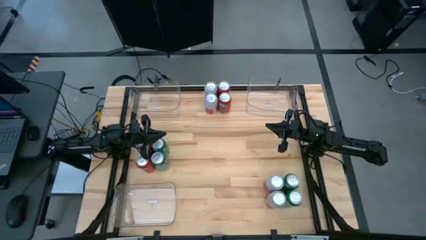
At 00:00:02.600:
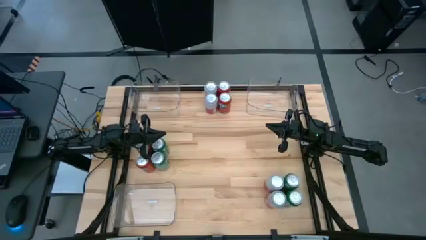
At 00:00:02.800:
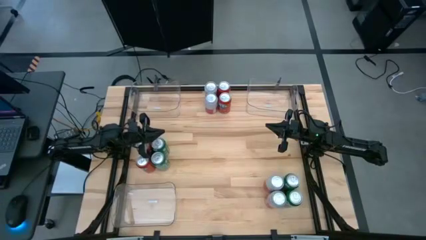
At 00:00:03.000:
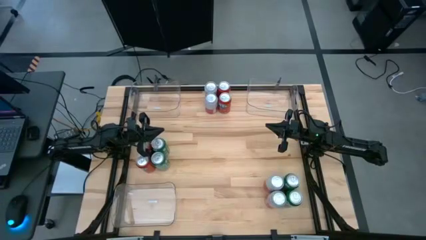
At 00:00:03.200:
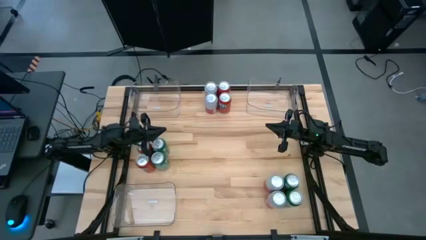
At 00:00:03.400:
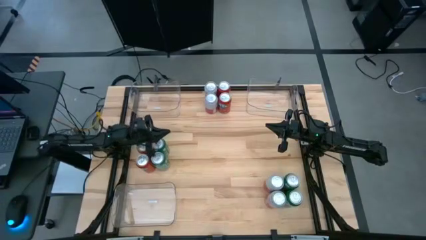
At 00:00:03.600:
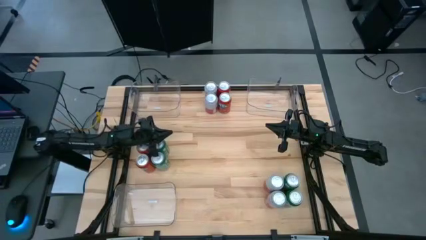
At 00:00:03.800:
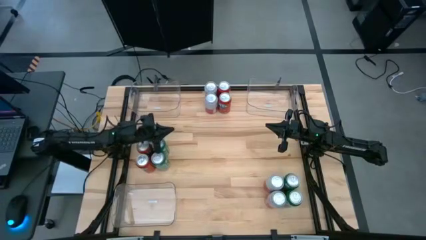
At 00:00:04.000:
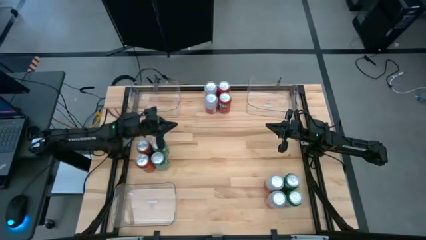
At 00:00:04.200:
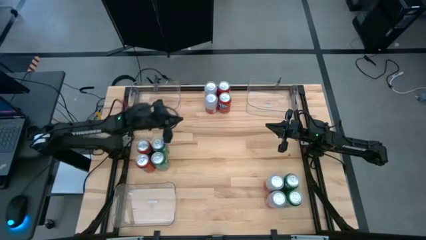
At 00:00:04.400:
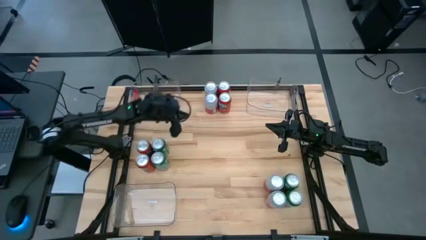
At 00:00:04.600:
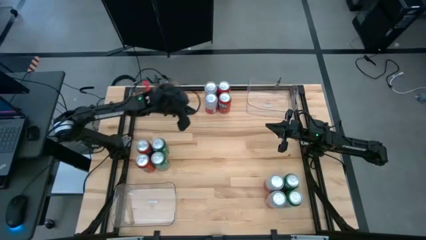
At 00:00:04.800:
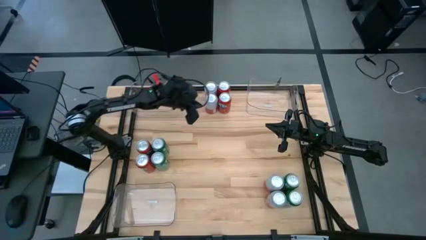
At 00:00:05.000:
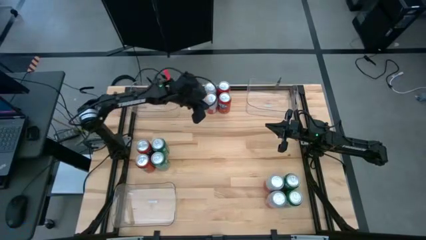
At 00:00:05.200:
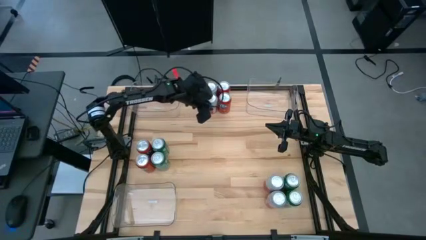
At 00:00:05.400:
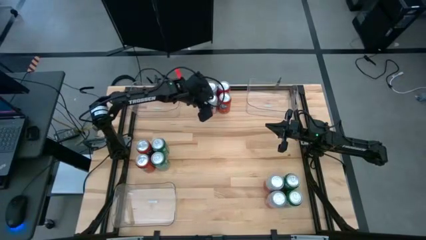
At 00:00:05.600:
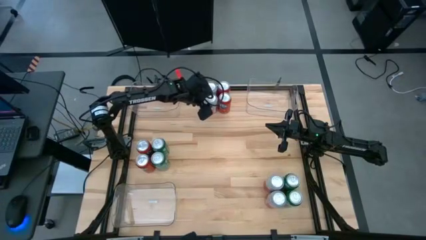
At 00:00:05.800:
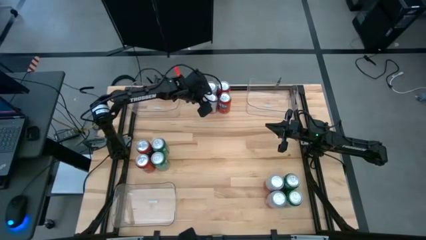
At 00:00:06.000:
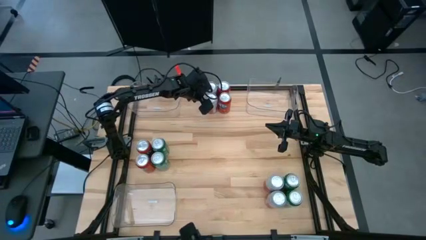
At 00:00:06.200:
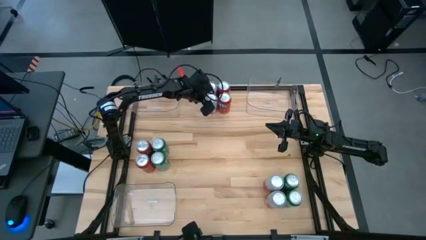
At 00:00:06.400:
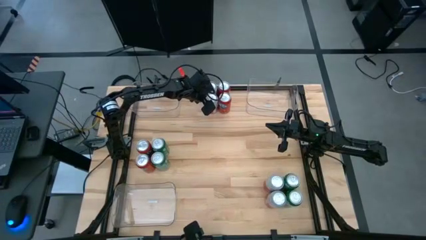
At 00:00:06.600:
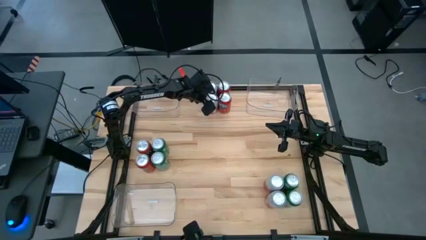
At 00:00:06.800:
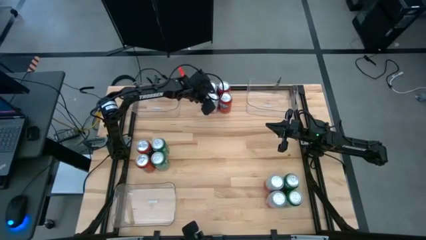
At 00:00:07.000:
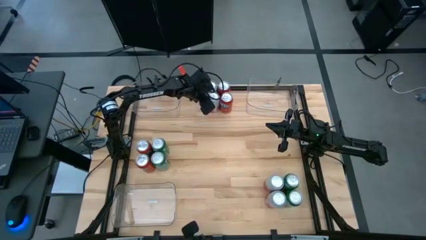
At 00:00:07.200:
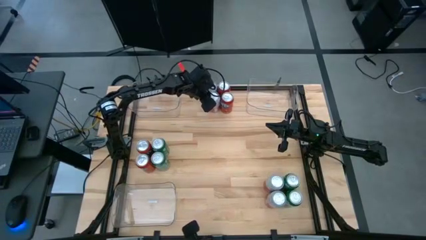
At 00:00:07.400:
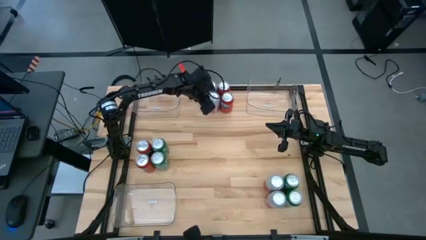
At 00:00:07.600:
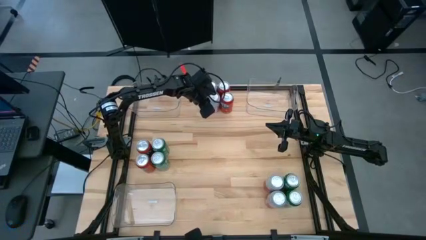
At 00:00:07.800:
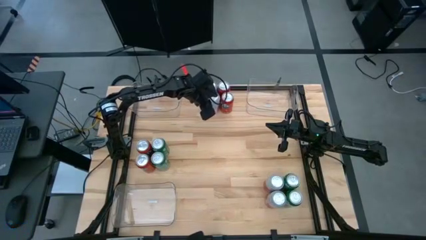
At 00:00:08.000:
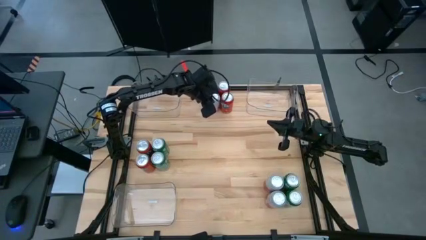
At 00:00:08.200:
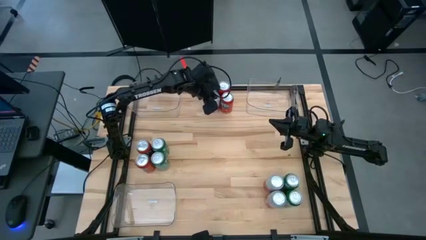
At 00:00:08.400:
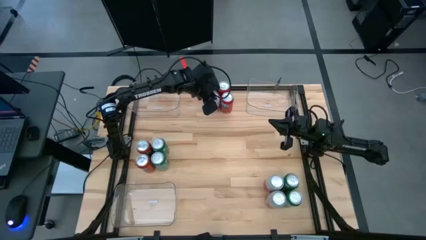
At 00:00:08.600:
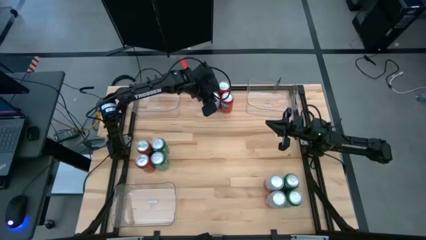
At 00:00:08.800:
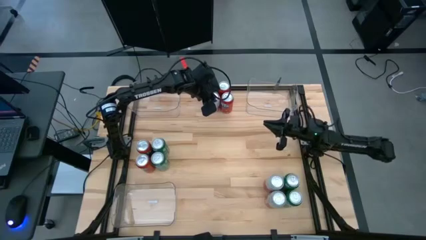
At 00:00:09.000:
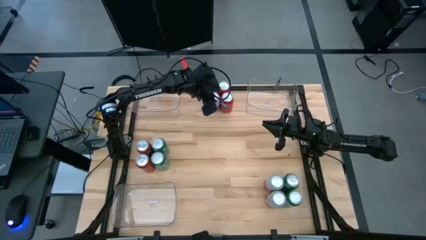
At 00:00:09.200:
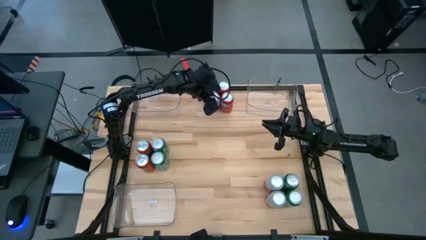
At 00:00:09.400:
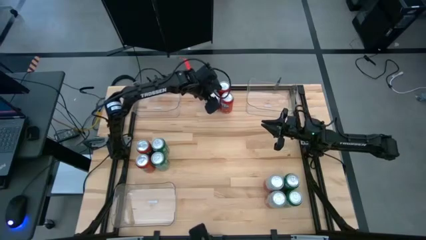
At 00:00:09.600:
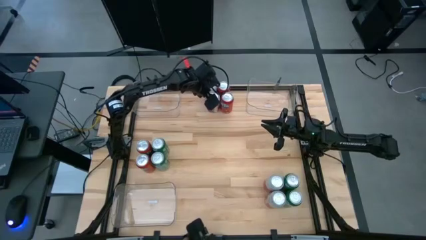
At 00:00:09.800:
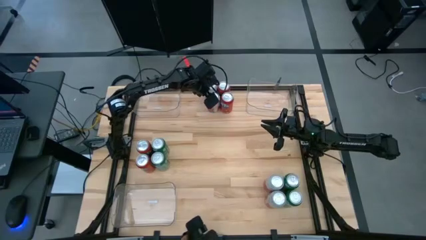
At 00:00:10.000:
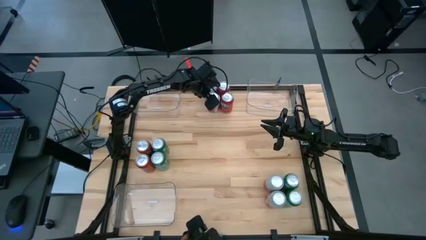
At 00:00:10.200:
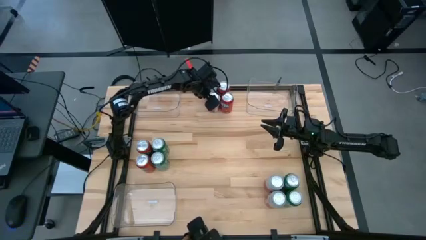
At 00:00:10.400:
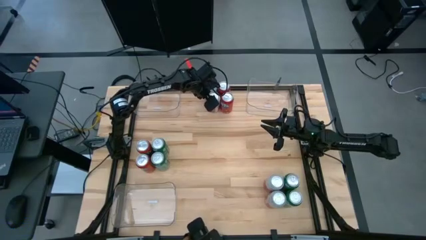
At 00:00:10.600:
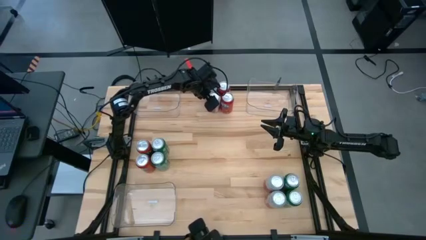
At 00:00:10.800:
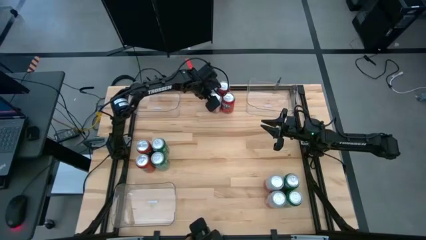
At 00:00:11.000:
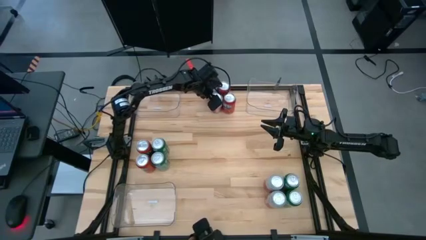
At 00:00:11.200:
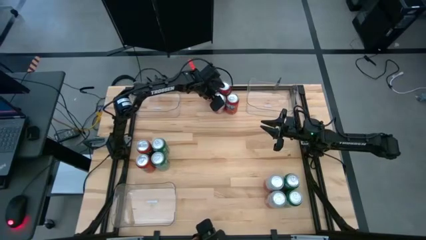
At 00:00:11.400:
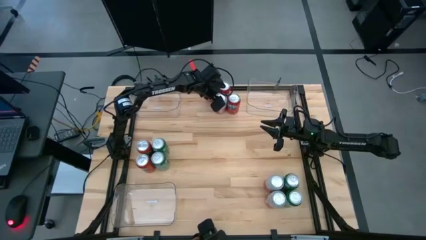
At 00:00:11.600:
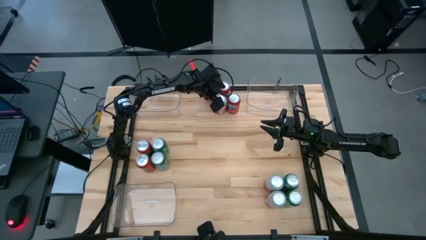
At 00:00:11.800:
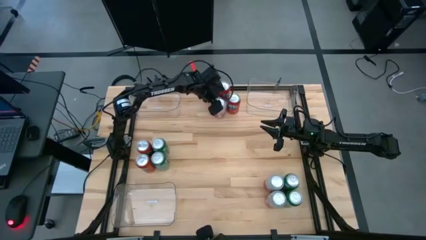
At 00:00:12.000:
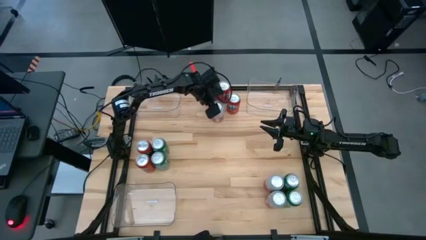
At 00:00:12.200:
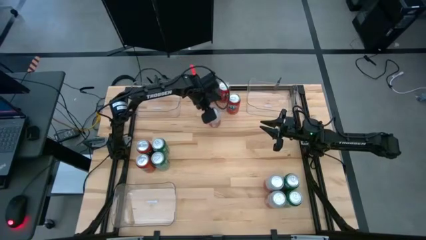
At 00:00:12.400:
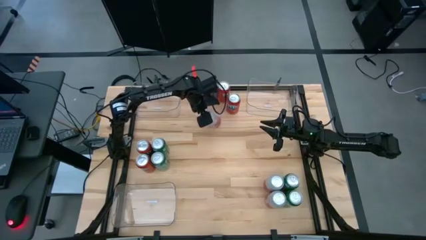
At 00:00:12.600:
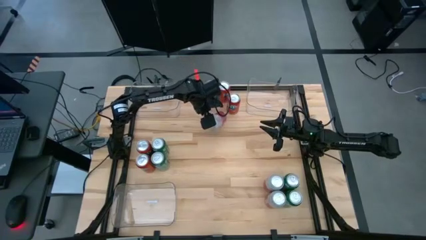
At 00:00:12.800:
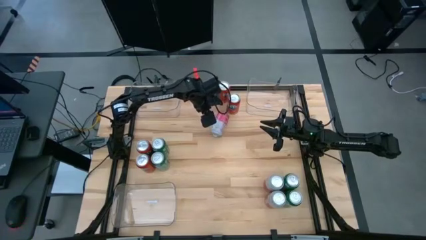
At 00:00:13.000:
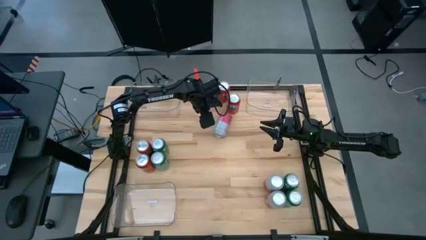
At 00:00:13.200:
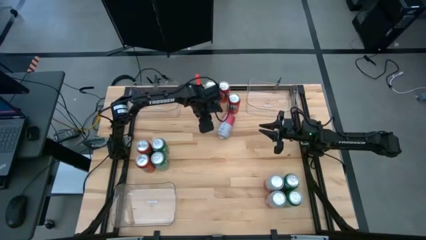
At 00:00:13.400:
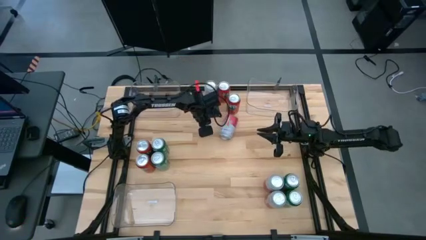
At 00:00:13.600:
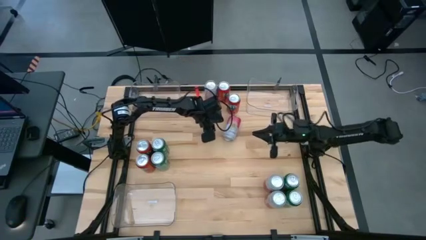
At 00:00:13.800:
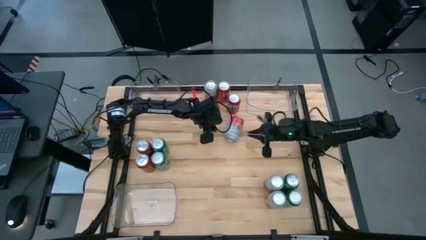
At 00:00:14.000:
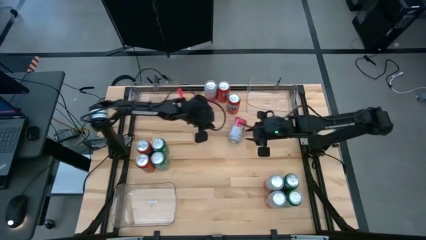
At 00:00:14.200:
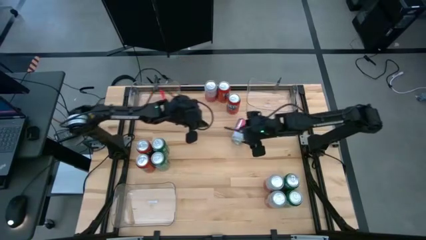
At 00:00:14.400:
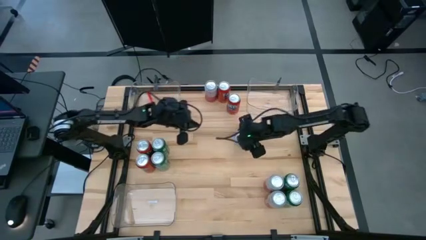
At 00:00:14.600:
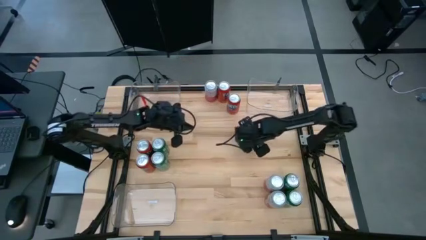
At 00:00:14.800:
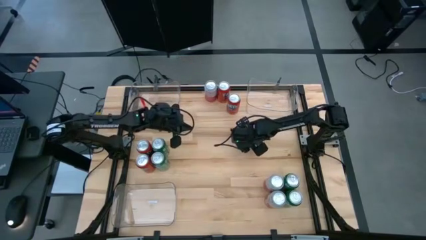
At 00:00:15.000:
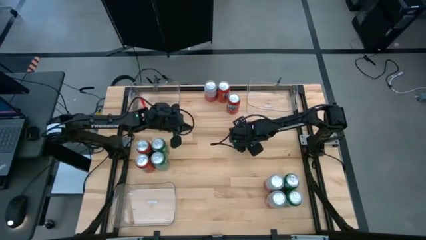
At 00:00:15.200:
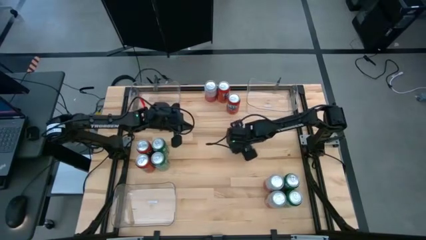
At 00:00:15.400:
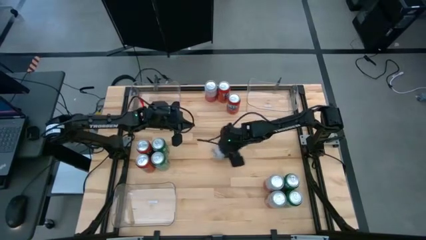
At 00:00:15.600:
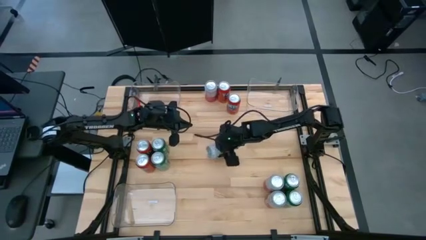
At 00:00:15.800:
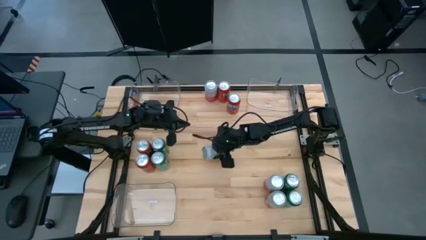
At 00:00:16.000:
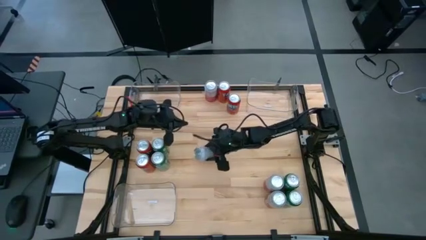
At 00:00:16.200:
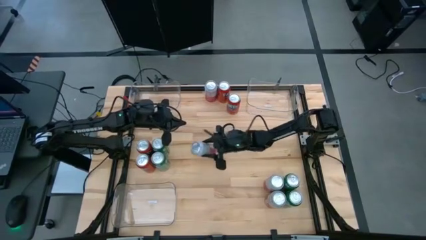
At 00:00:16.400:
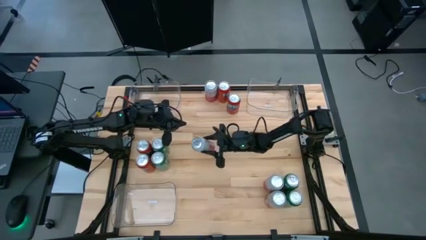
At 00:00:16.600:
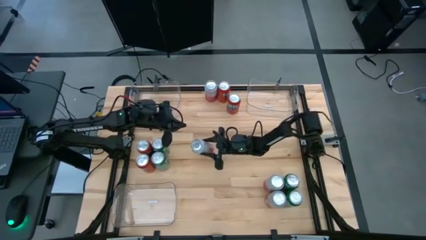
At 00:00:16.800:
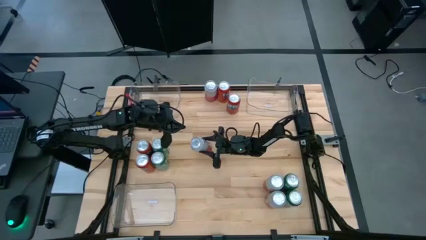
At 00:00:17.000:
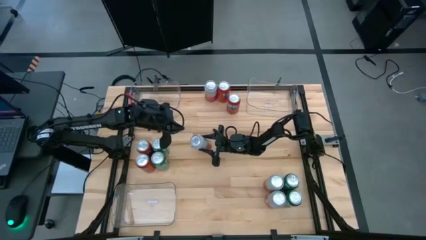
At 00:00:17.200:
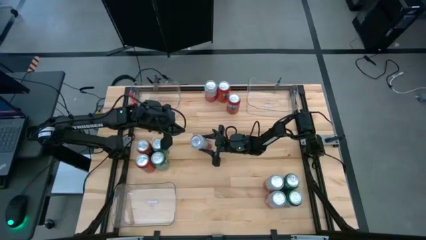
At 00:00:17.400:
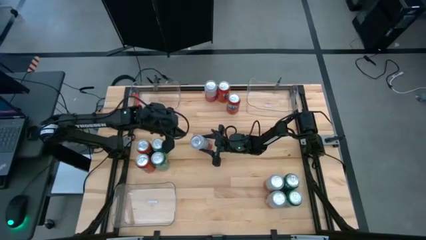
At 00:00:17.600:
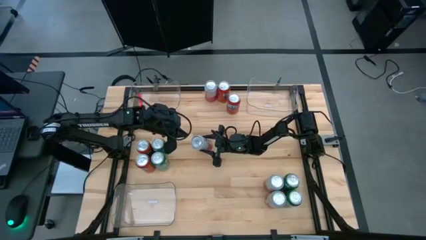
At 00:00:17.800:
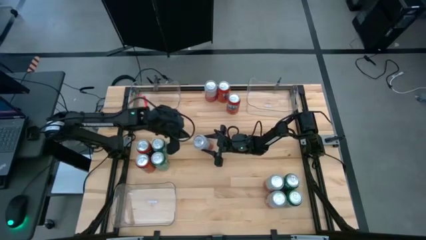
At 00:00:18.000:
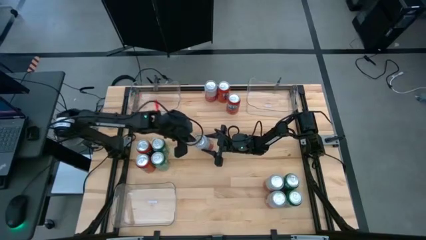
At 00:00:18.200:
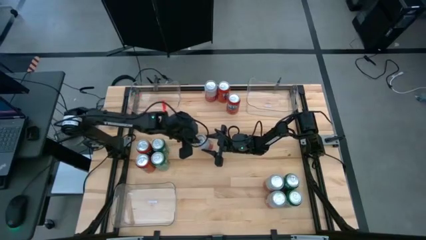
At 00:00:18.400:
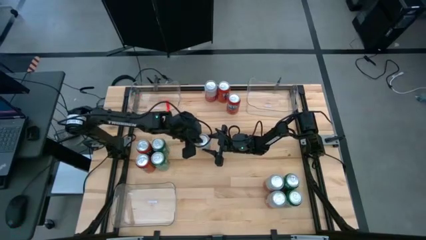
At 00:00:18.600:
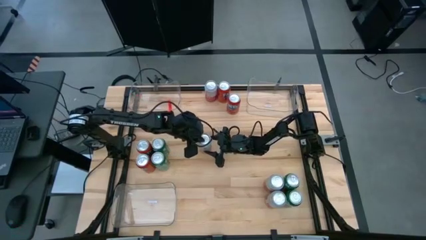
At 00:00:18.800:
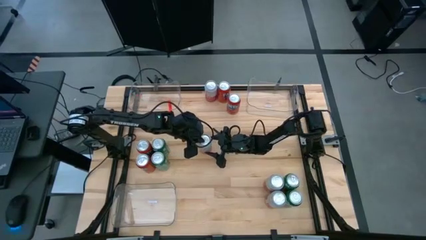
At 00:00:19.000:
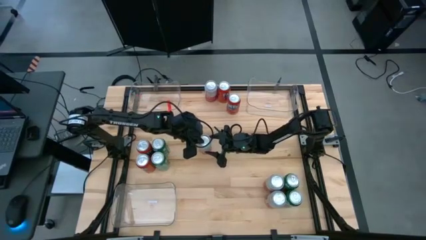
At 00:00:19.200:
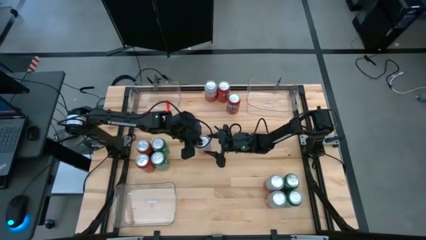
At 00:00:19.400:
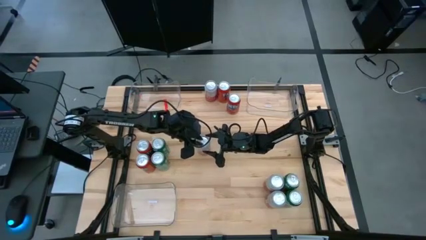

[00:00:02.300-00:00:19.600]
Task: Sort soda cans
Put the pink-white soda can into the top left transparent bin
